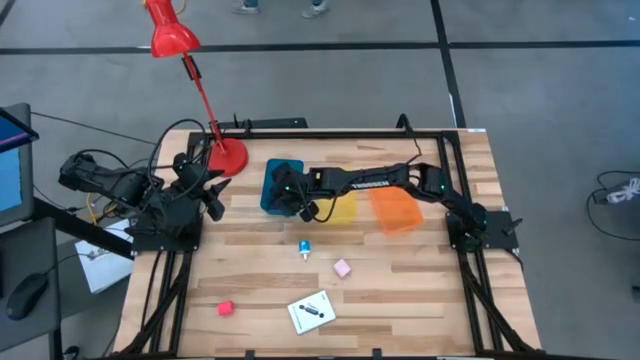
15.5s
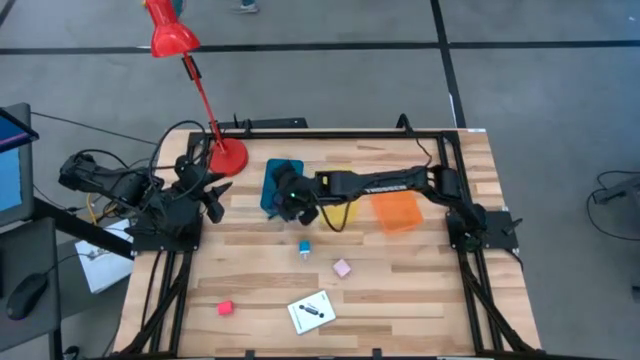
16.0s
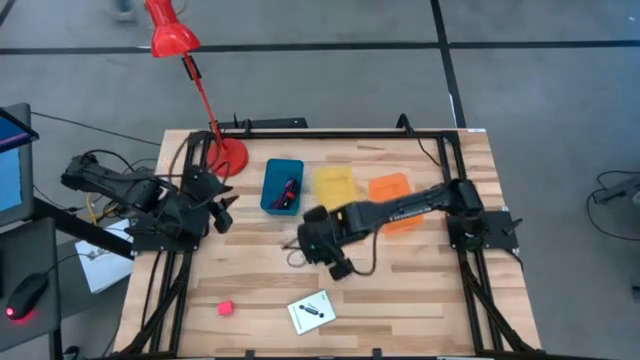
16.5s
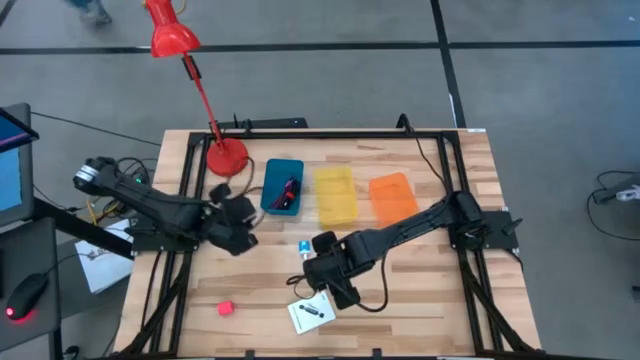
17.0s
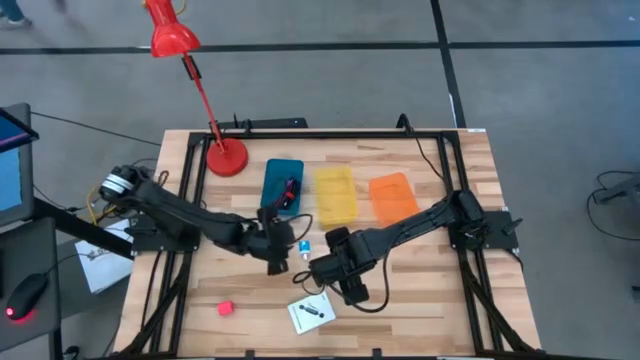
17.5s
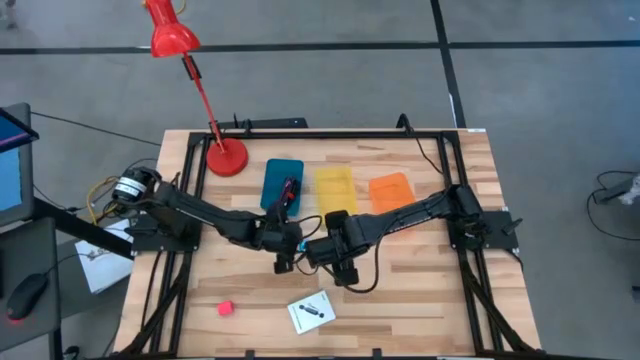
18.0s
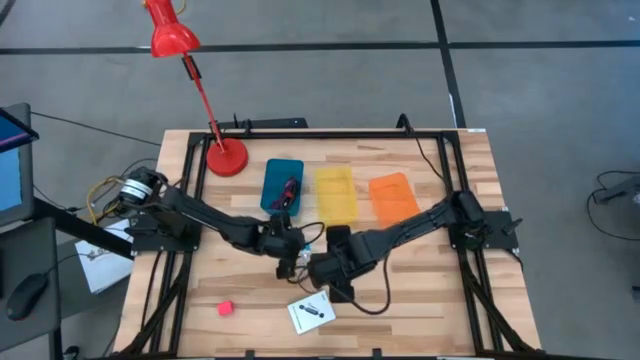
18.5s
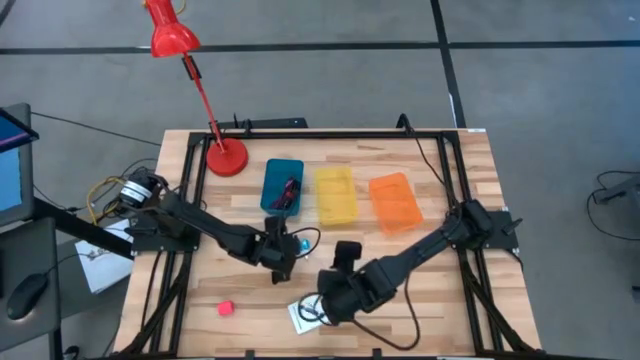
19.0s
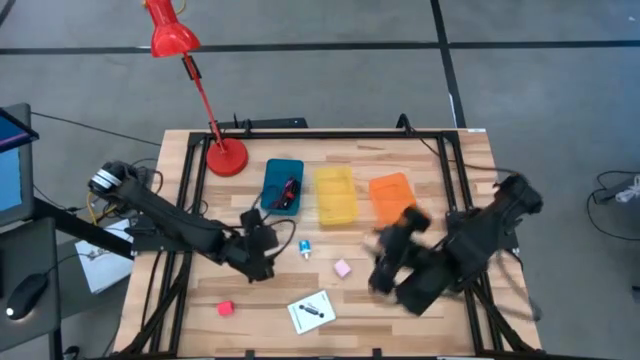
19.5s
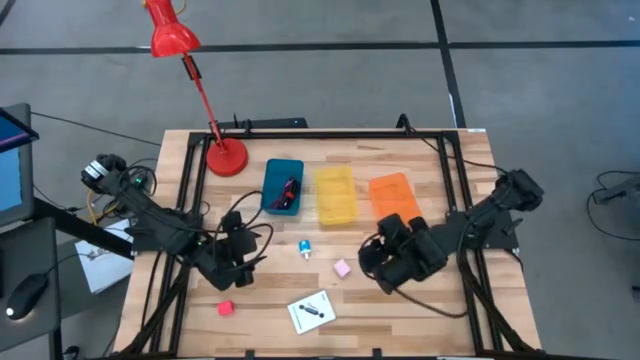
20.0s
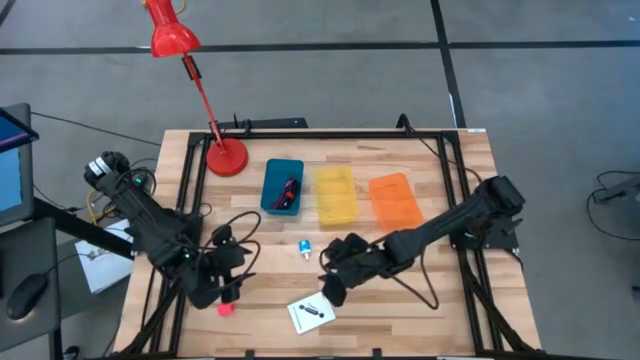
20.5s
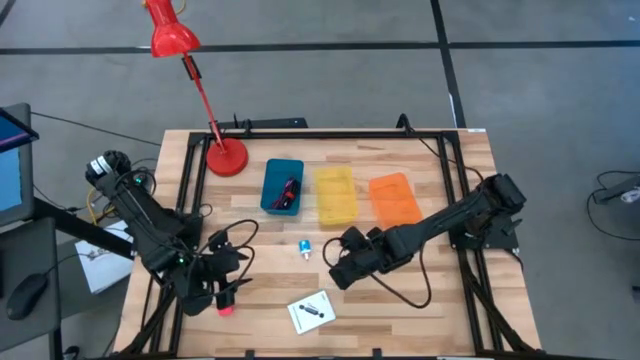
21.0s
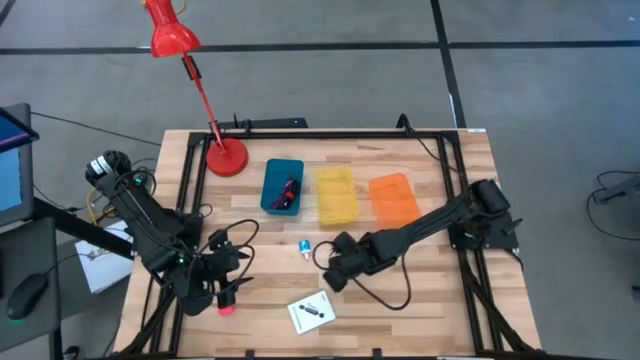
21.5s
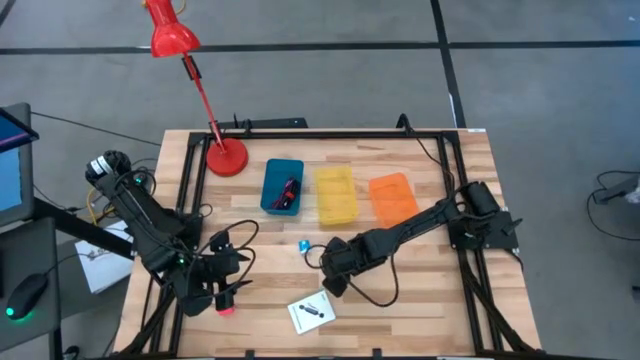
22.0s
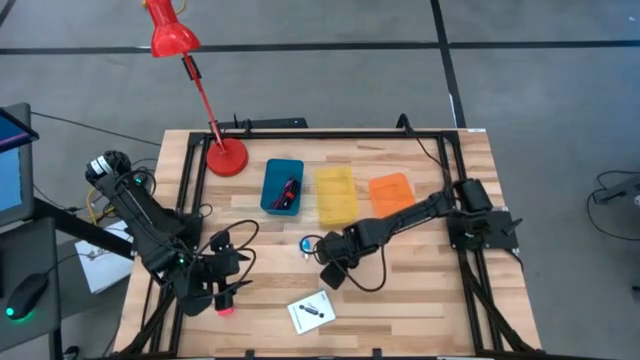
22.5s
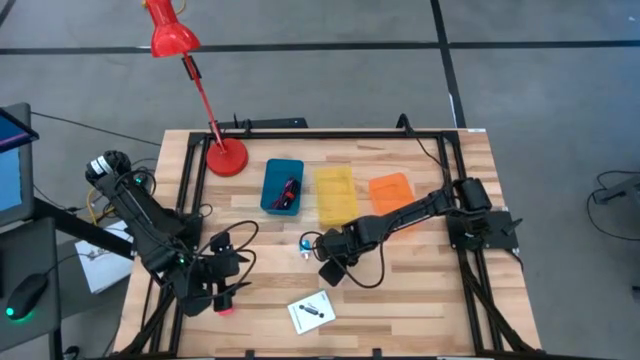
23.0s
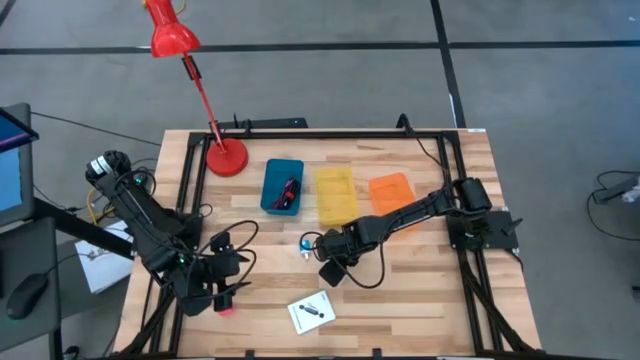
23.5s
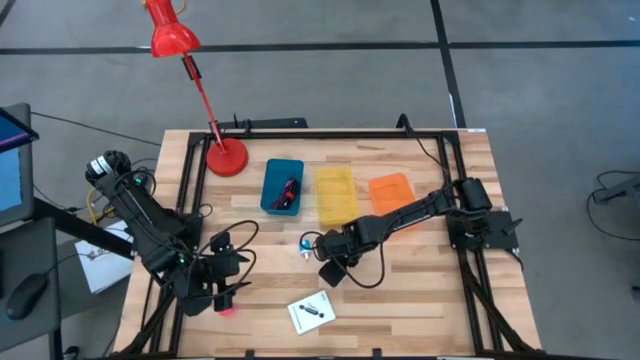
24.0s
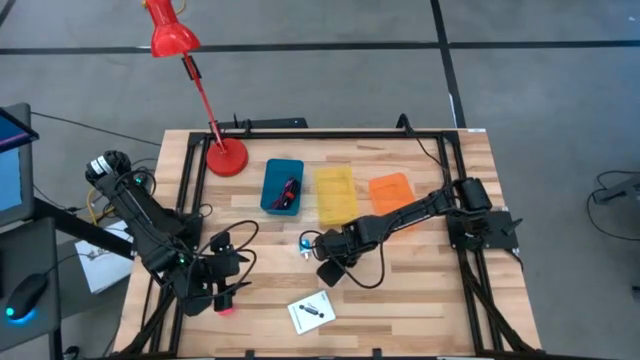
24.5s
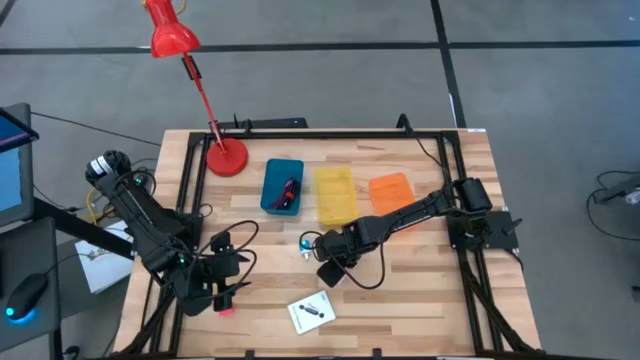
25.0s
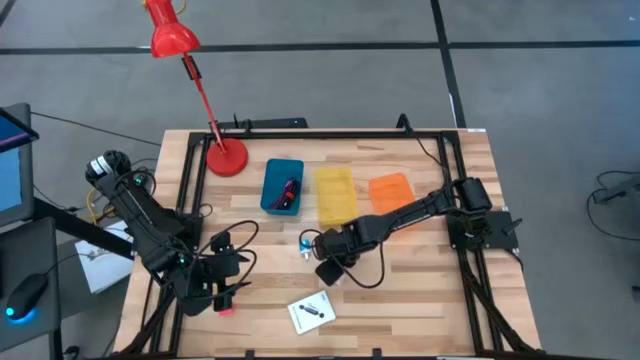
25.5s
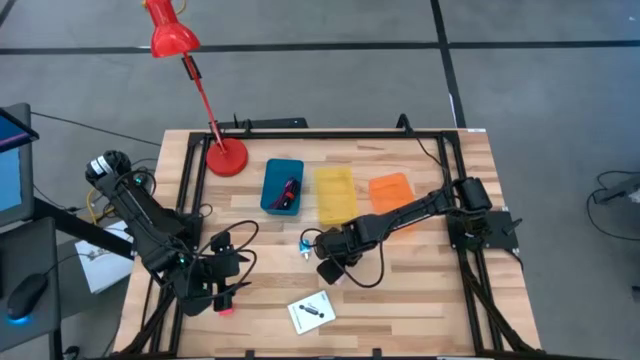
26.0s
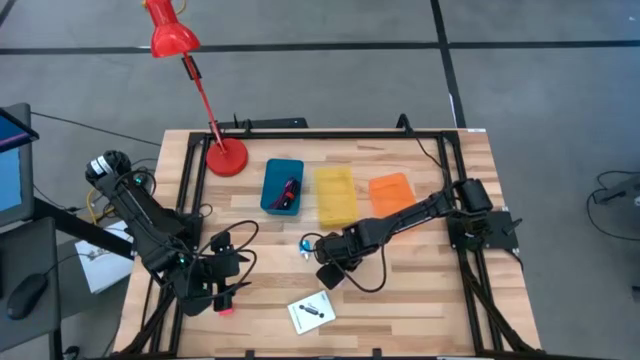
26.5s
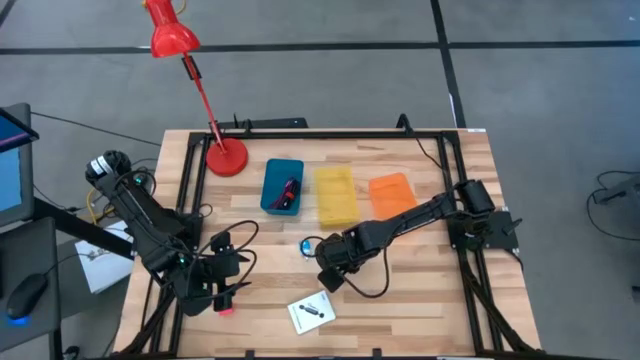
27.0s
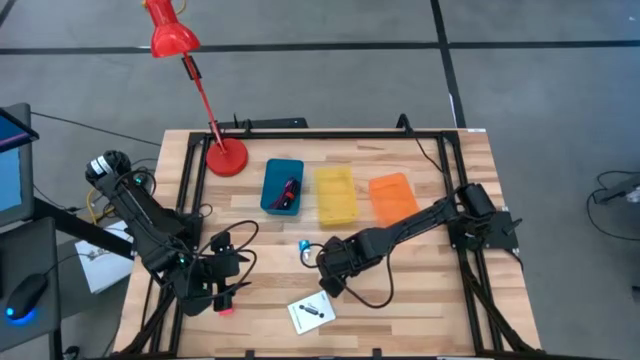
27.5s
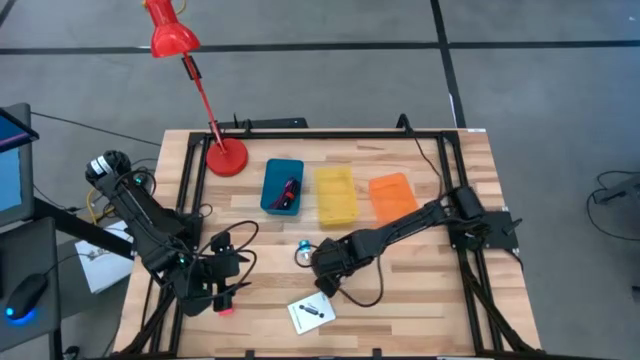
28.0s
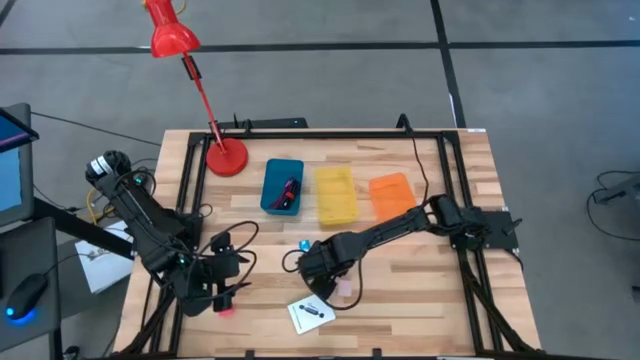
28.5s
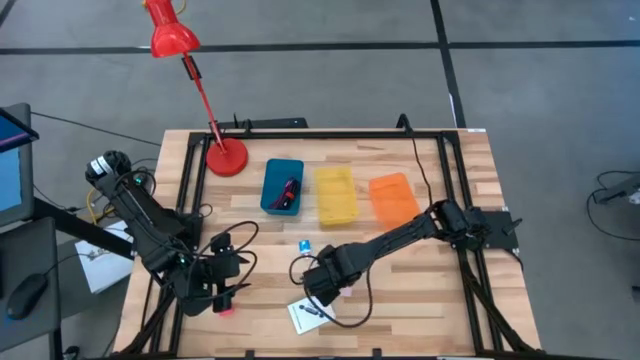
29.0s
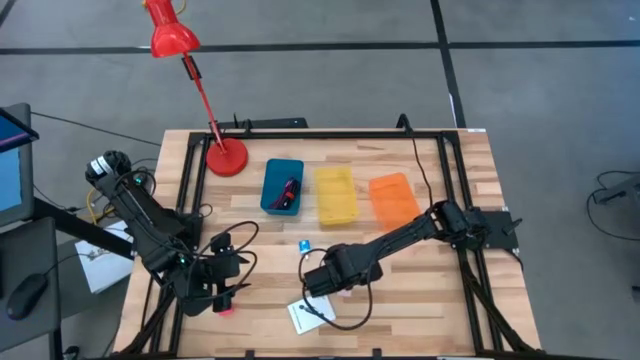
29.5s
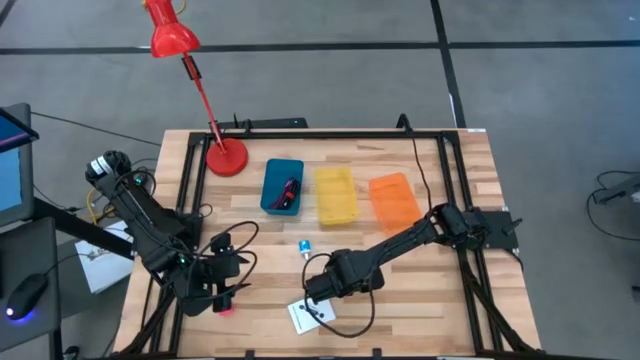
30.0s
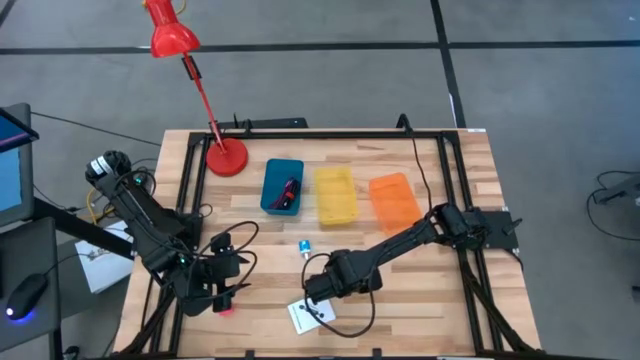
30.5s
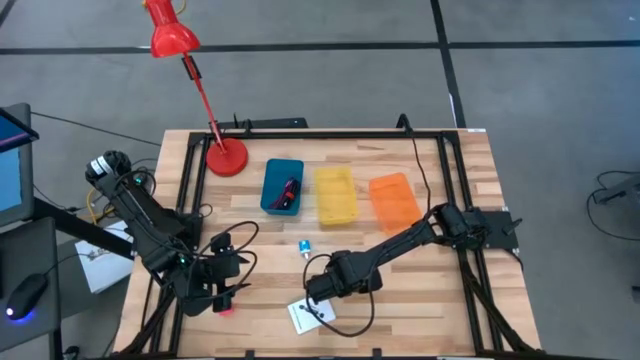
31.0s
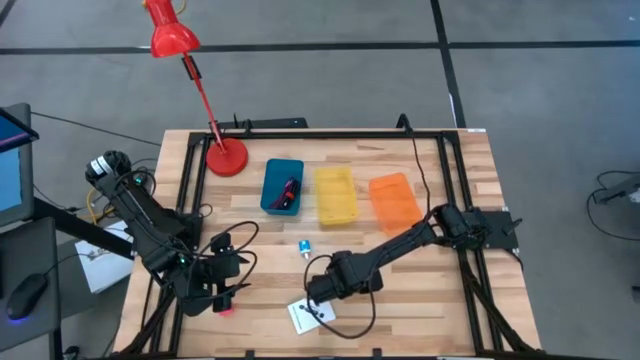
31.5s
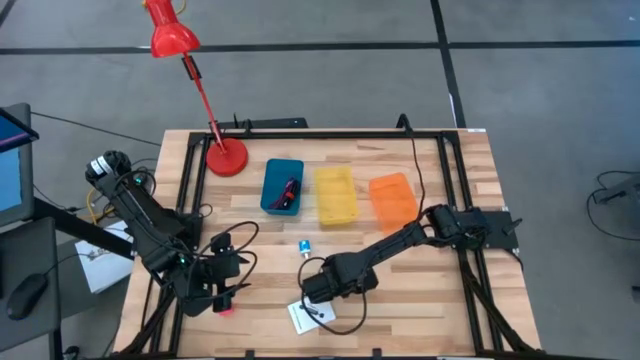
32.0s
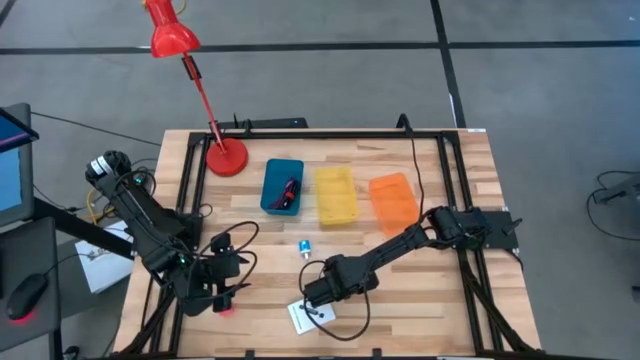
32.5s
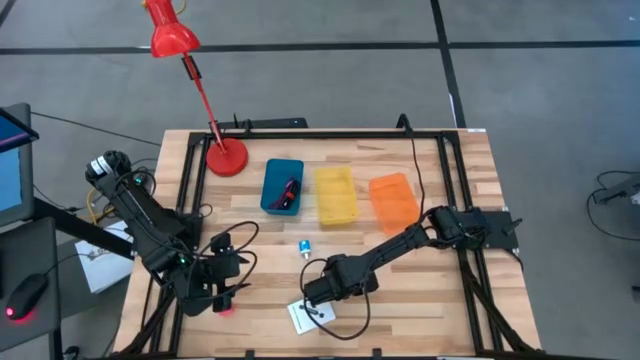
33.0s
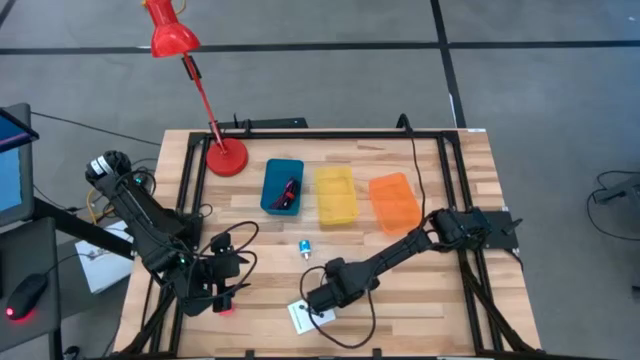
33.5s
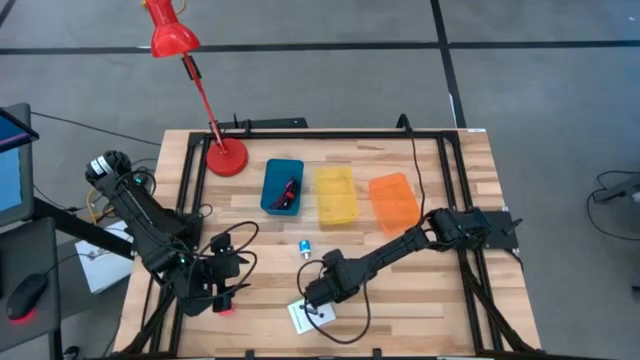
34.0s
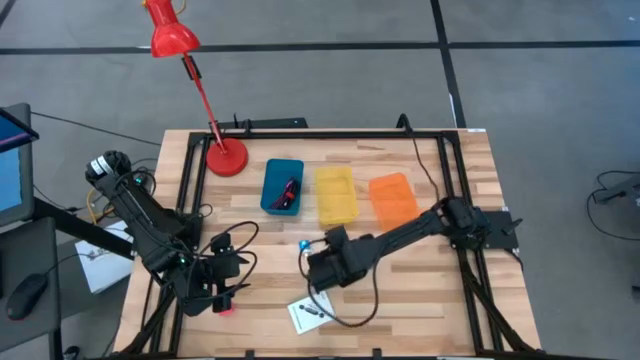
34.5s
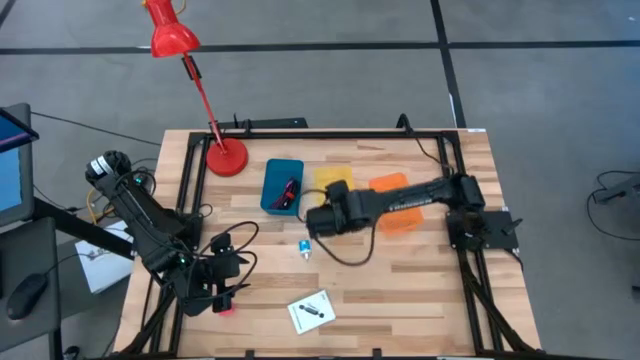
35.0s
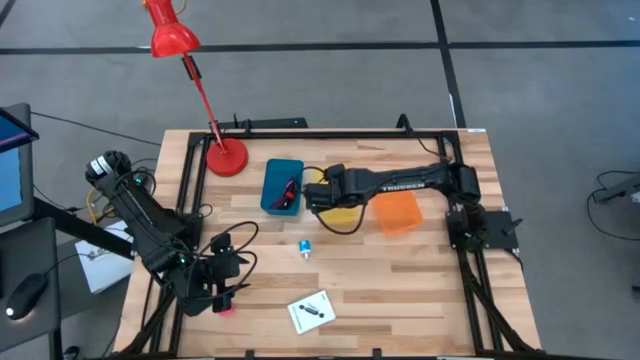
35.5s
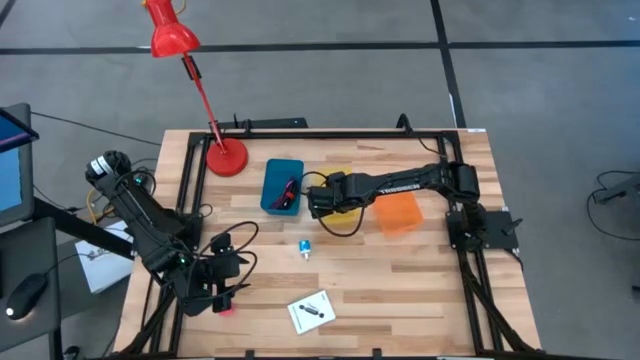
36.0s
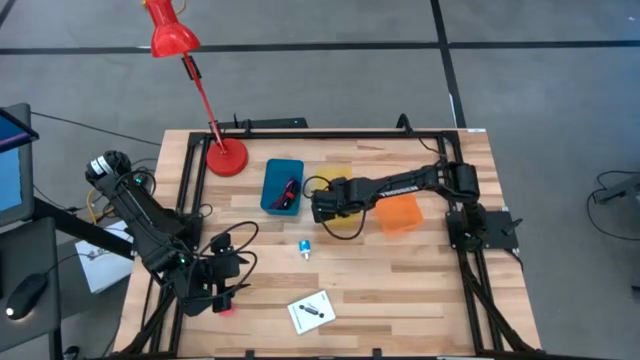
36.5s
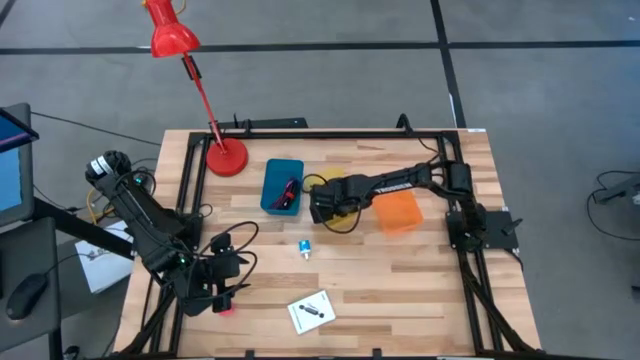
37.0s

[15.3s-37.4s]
Task: Pick and place items into bin
Put the white charger adapter into the yellow bin
